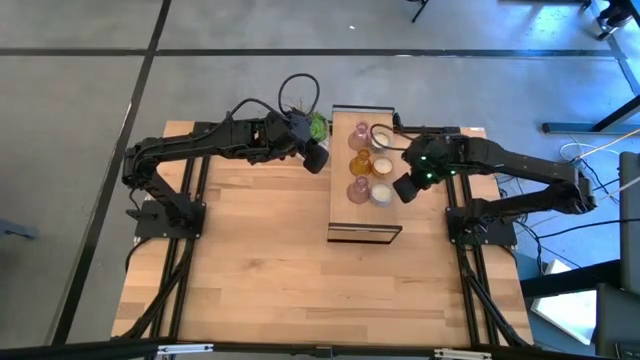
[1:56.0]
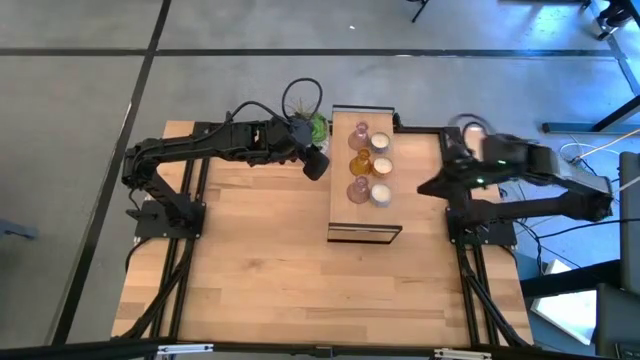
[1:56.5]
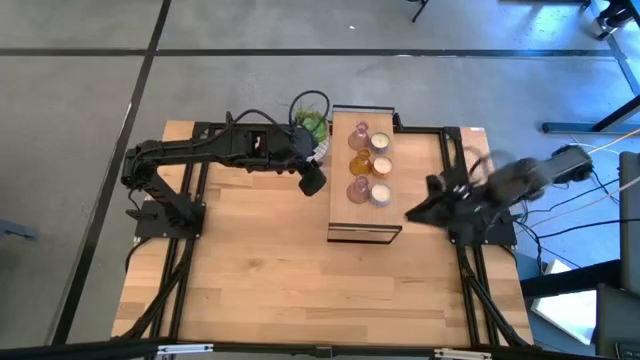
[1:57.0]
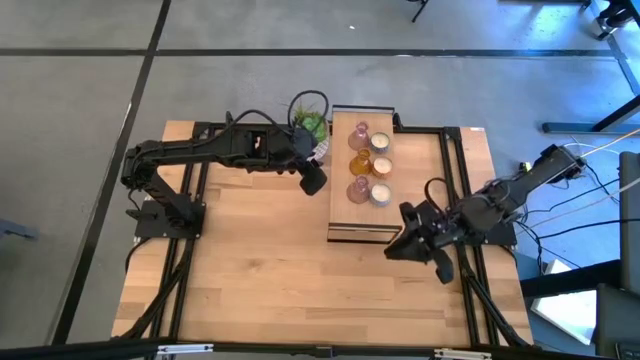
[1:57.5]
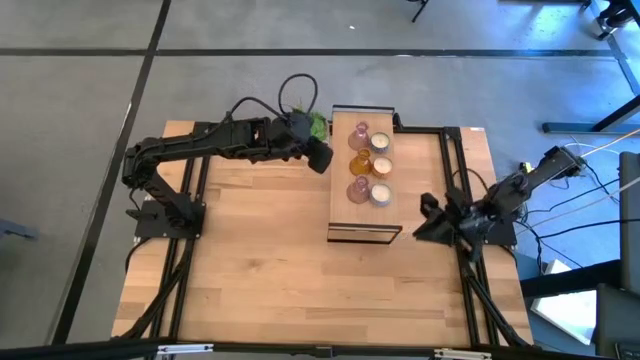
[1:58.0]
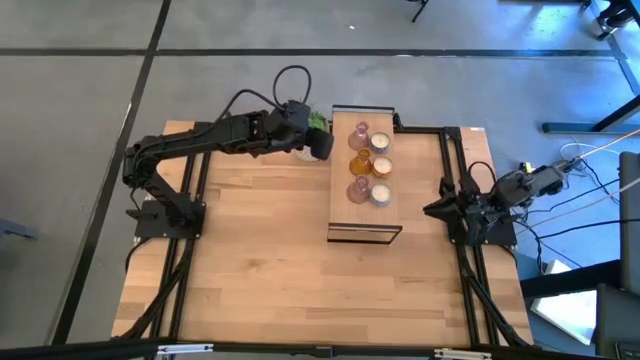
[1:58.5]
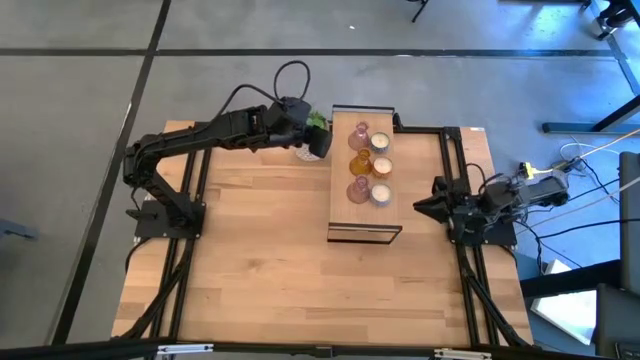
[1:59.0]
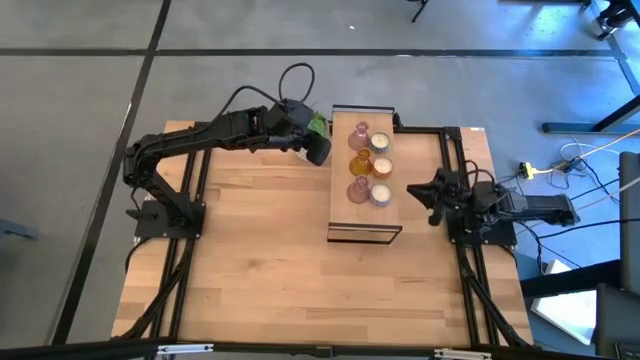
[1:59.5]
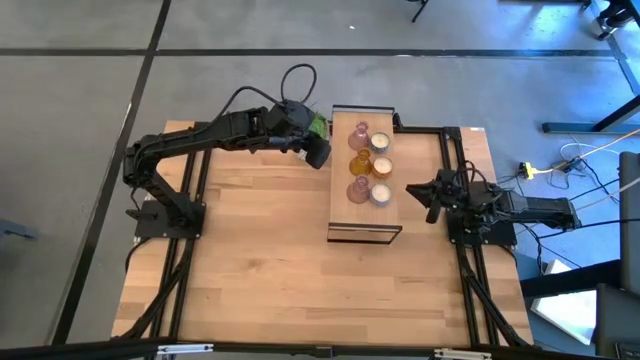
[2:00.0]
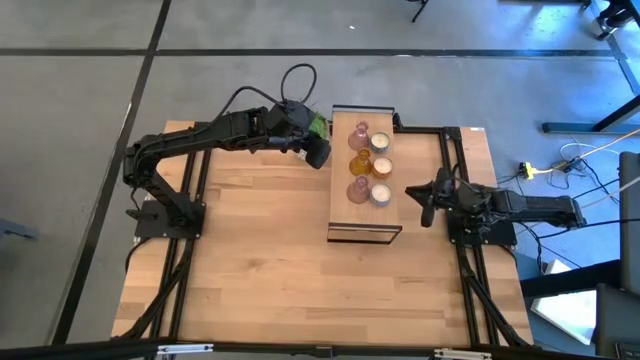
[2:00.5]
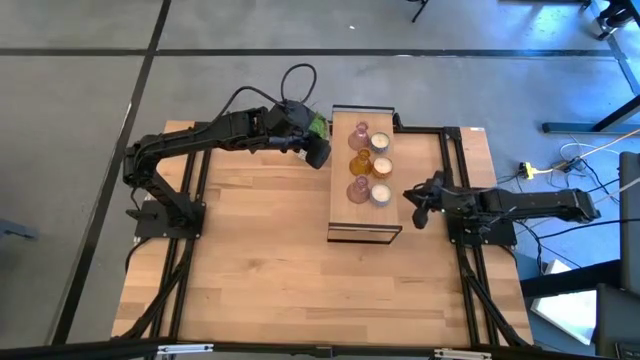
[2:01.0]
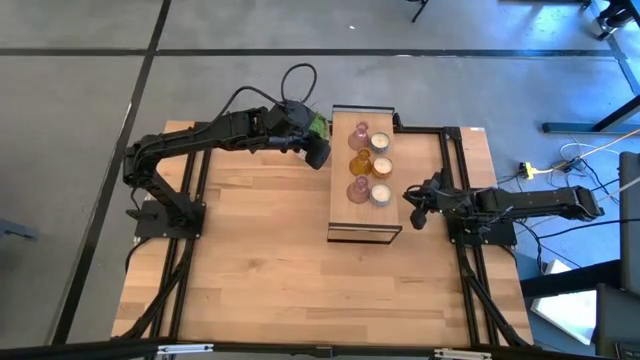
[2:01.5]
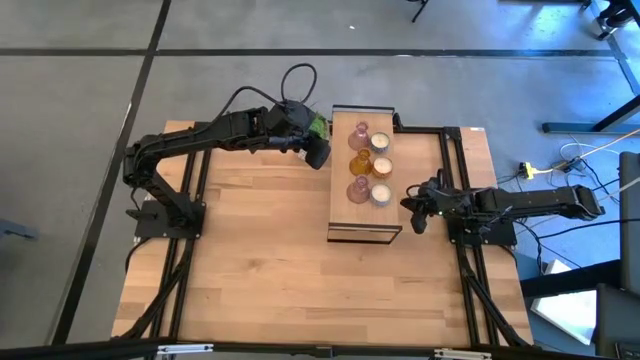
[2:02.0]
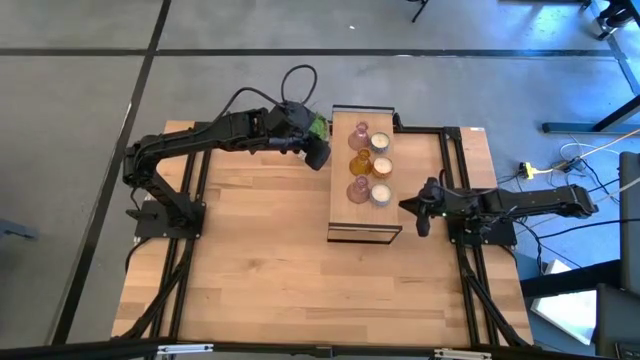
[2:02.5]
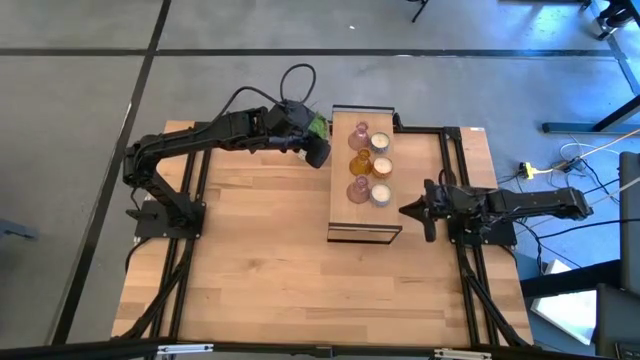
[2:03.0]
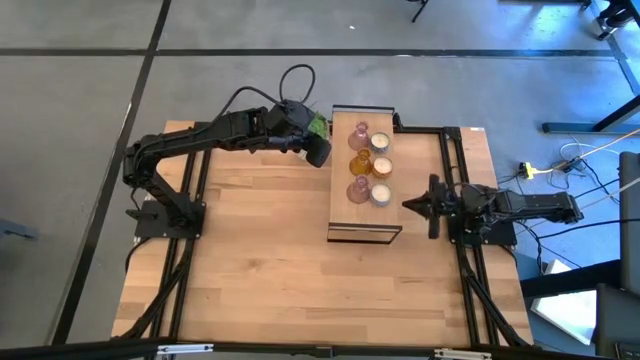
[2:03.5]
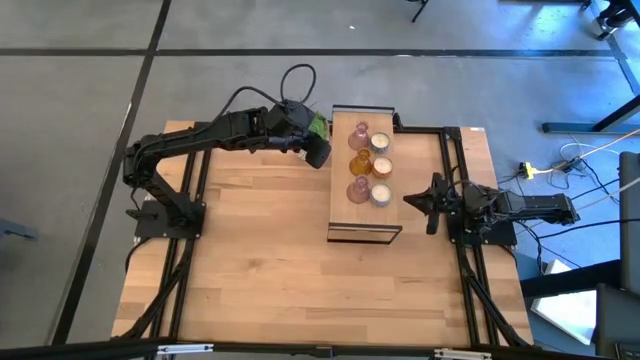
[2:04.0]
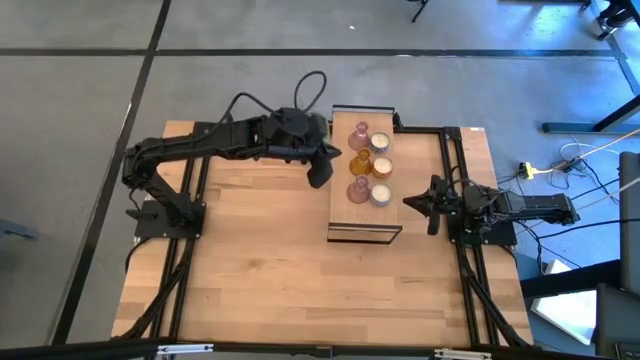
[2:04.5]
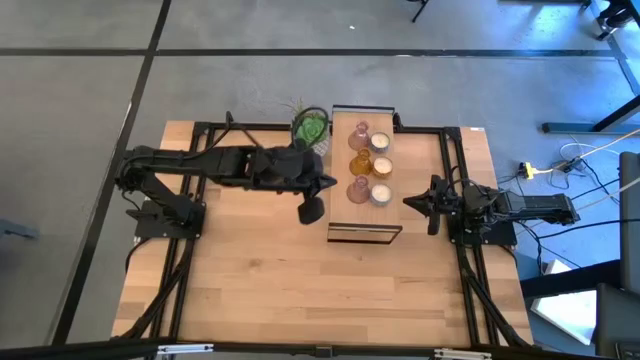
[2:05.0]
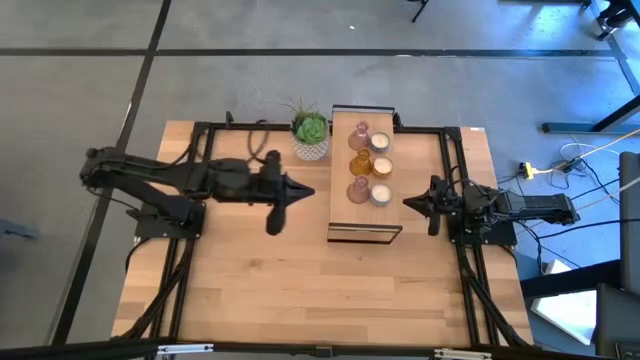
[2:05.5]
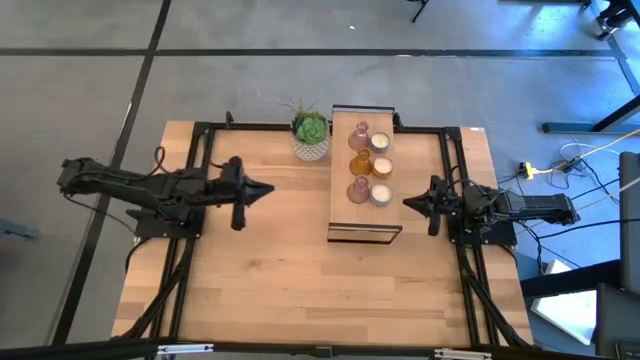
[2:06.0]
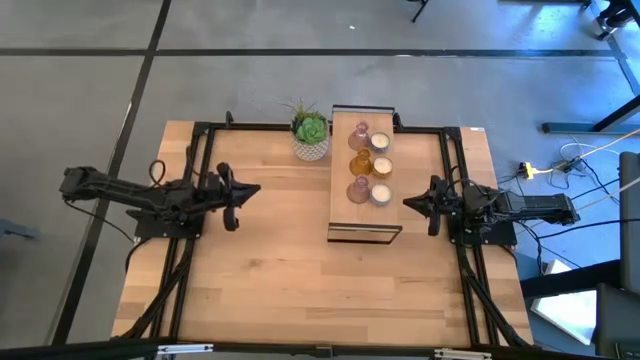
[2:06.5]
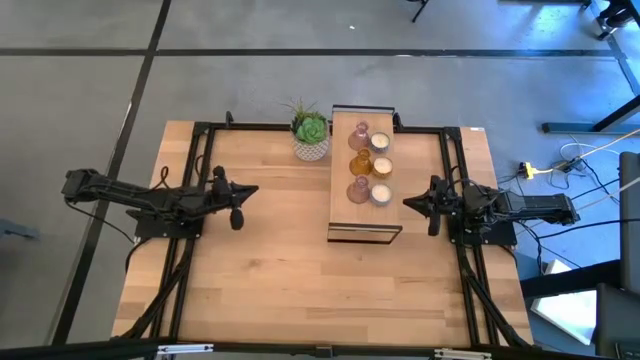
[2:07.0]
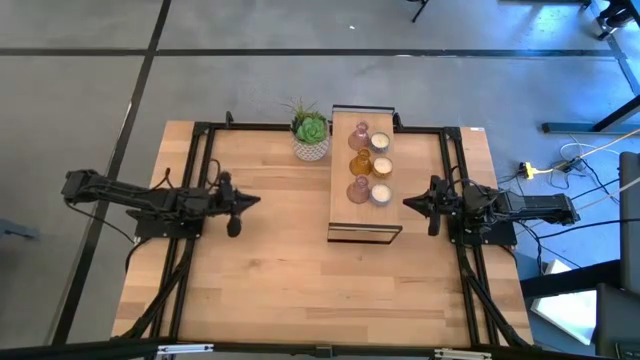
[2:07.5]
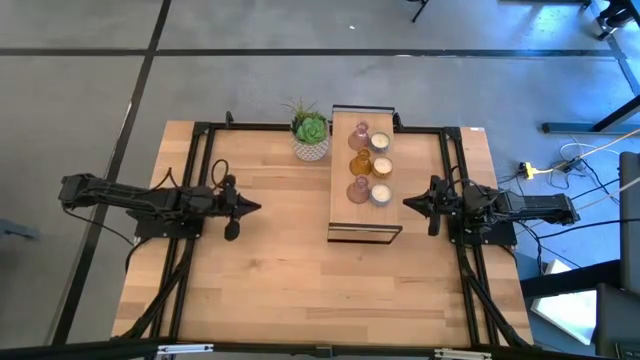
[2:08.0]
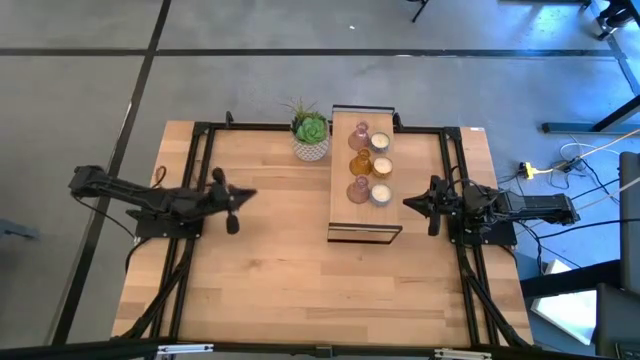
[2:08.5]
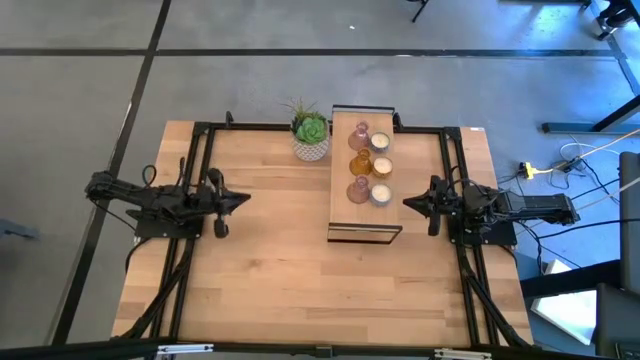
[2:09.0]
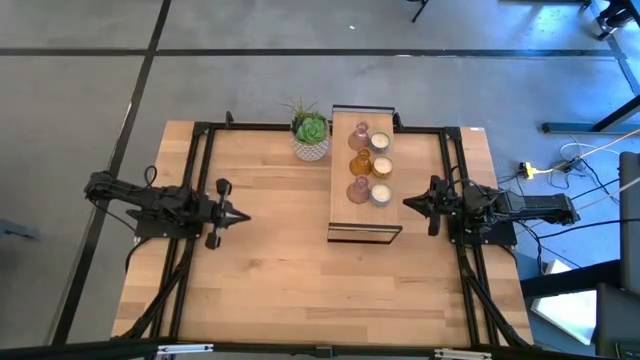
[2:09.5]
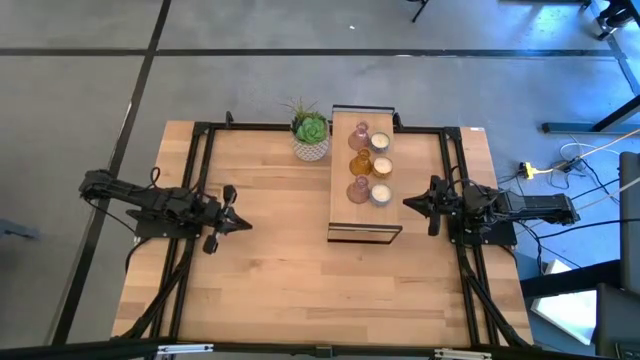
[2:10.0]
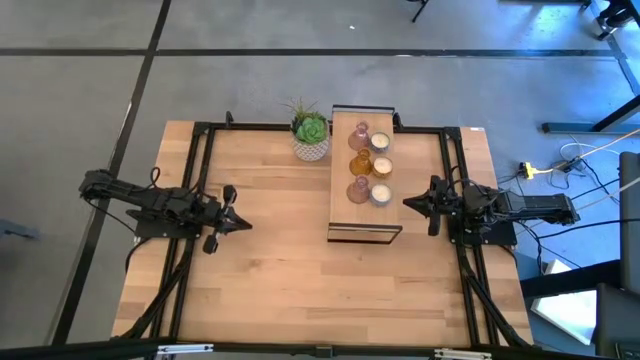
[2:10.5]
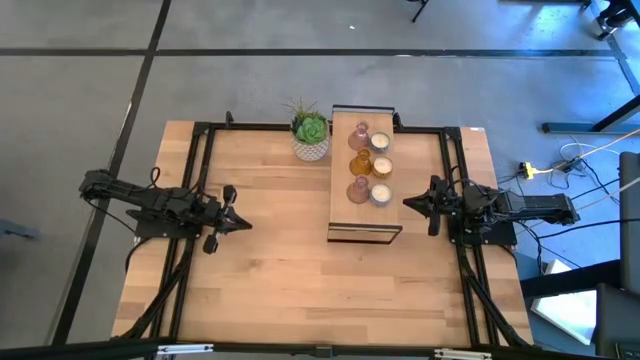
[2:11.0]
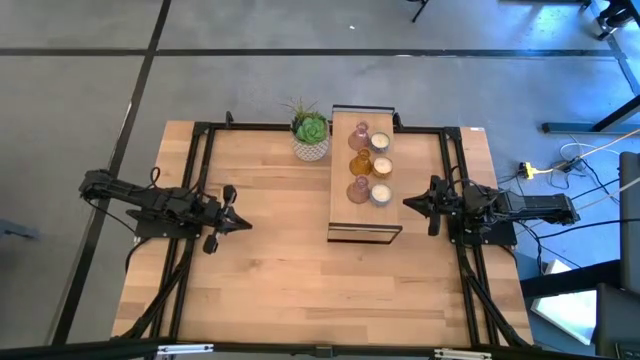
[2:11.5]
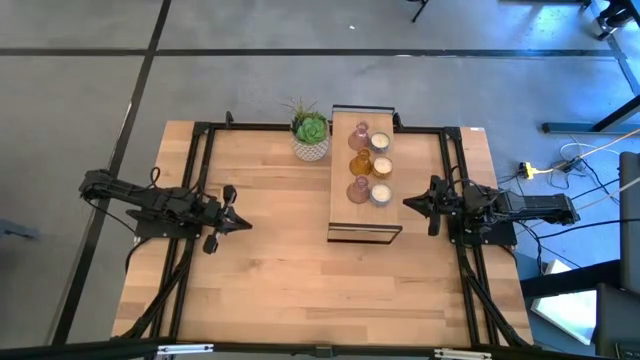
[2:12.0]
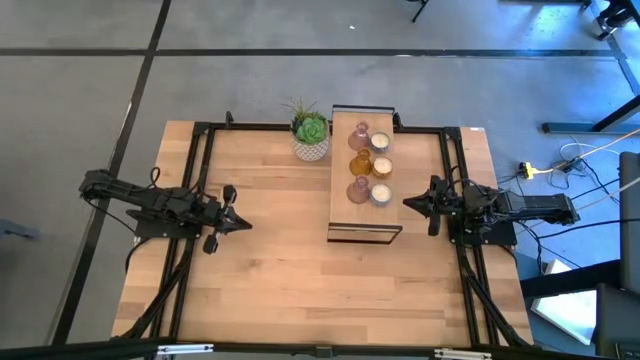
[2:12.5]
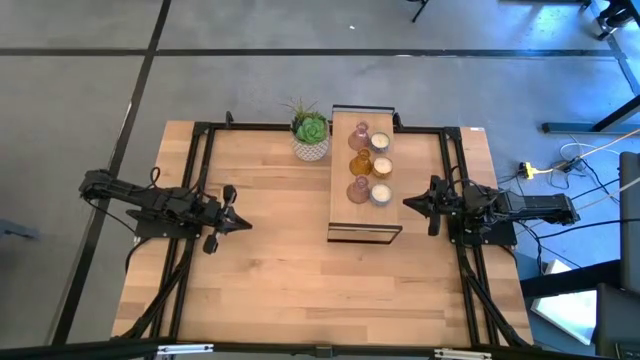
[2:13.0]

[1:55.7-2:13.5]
Task: Pick & Place candle stick holders
Return to Home Position

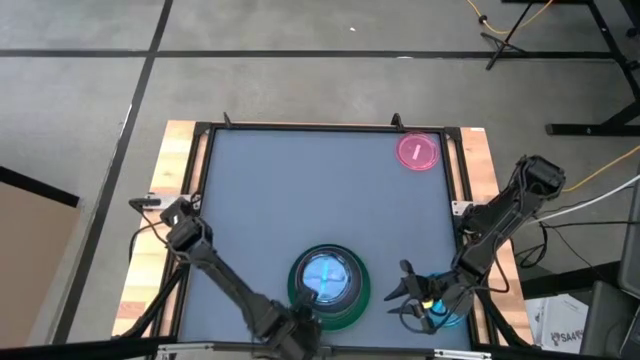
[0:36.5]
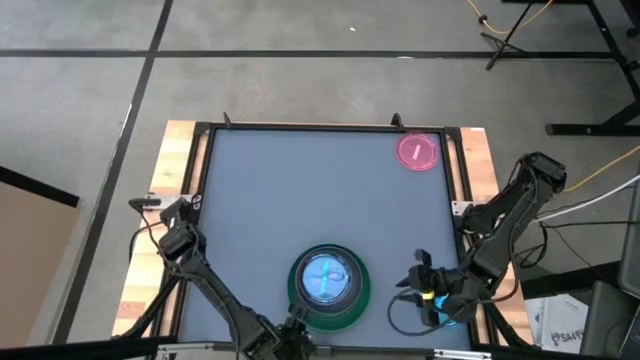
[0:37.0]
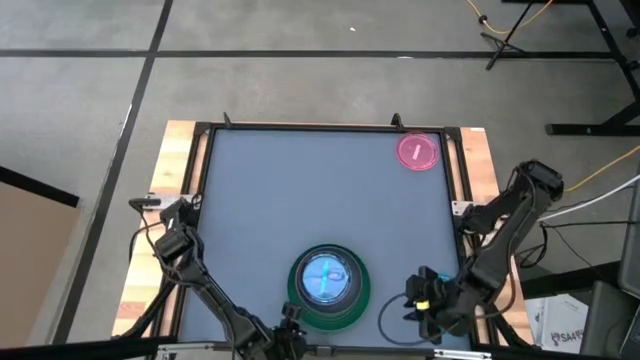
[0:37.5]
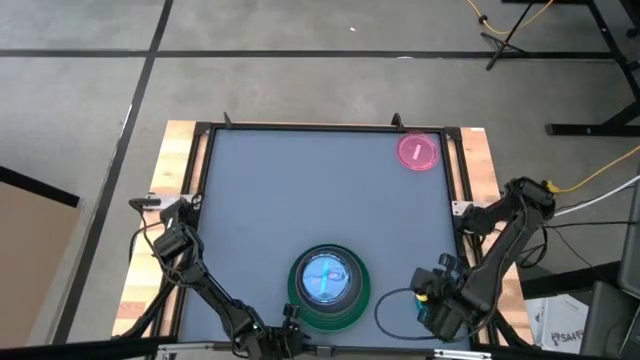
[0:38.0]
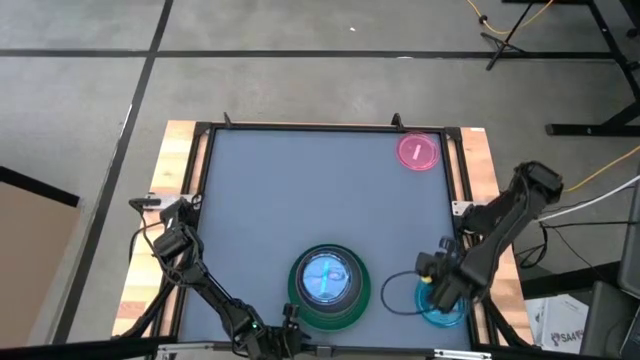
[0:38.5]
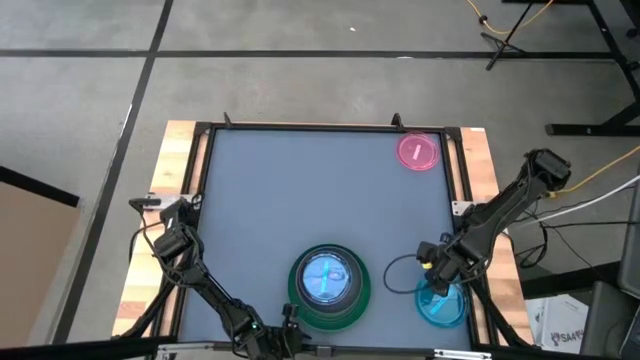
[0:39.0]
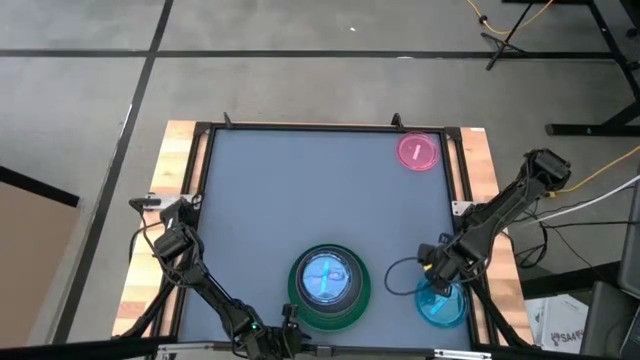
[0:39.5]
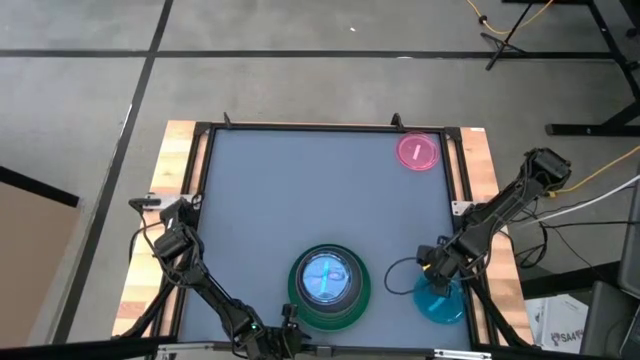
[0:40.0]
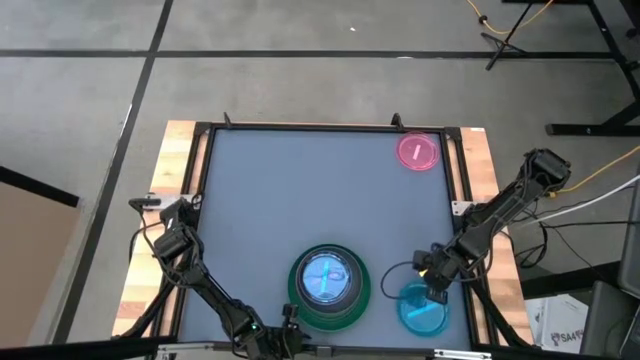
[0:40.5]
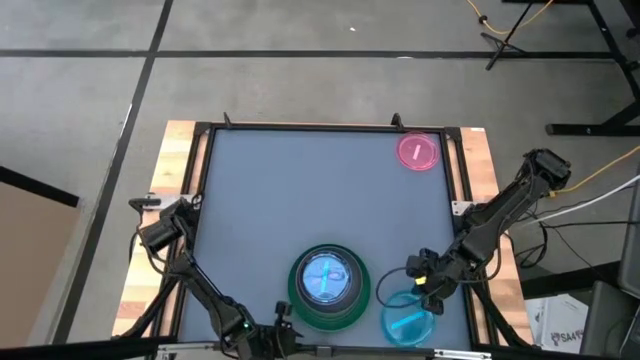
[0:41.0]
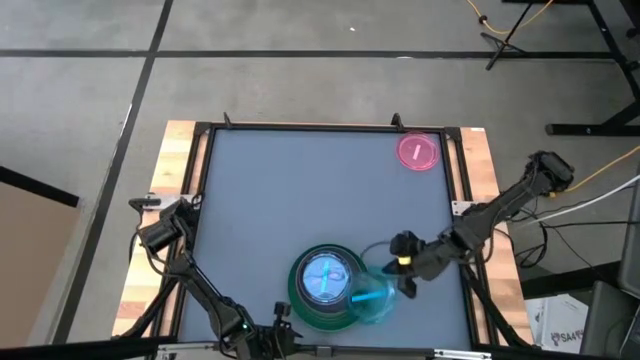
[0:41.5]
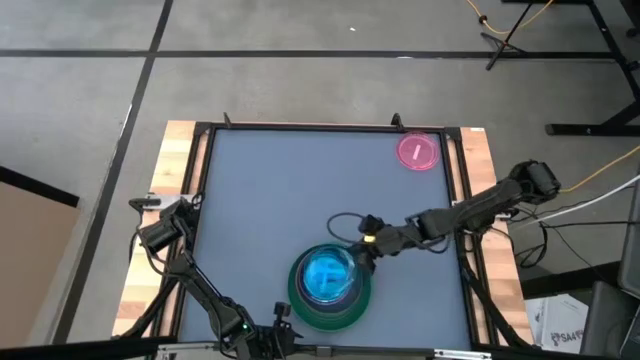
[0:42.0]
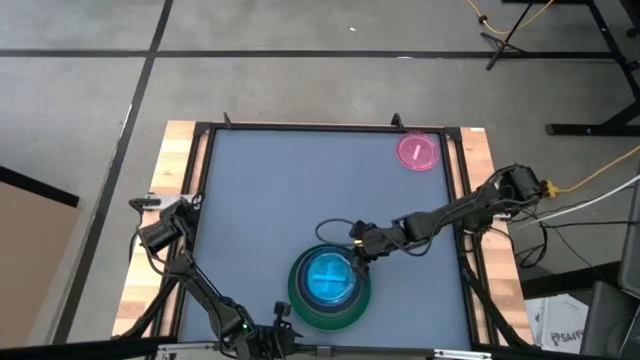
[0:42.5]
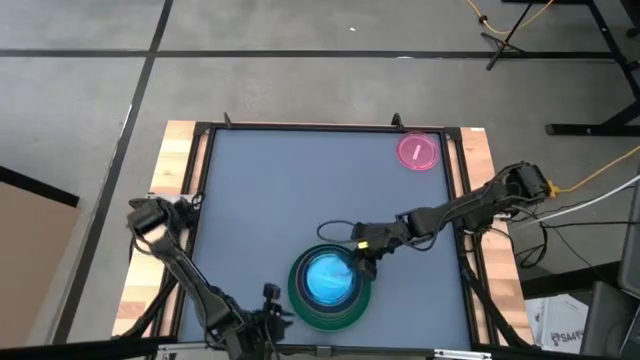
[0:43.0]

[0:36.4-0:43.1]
Task: Stack plastic plates
Stack the blue plate on top of the blue plate
